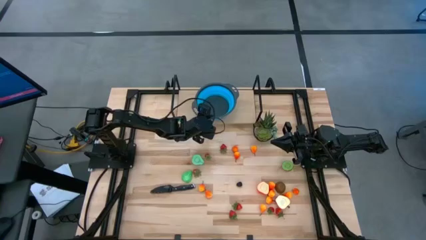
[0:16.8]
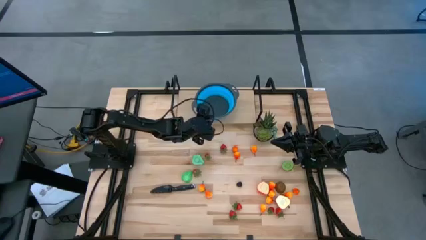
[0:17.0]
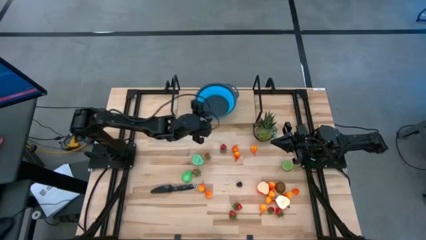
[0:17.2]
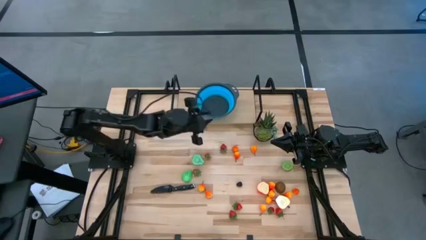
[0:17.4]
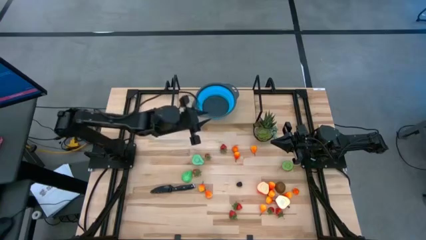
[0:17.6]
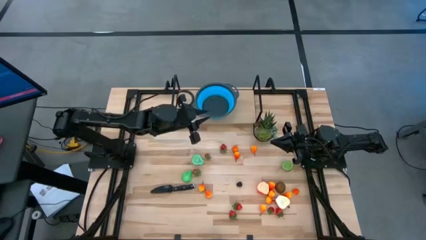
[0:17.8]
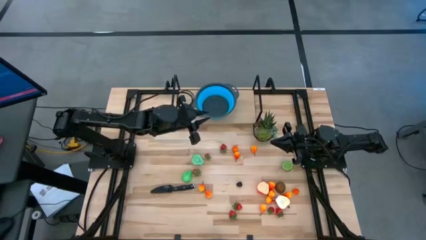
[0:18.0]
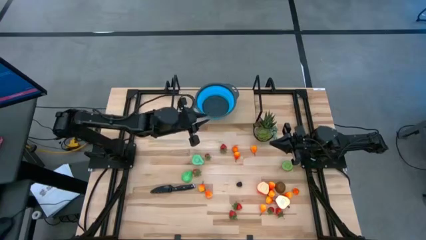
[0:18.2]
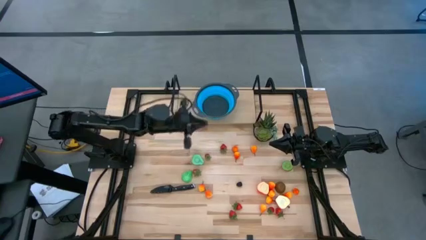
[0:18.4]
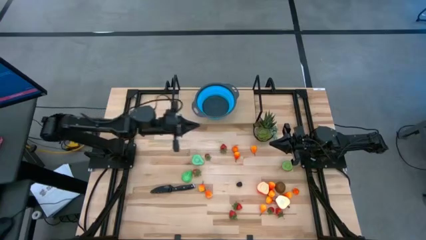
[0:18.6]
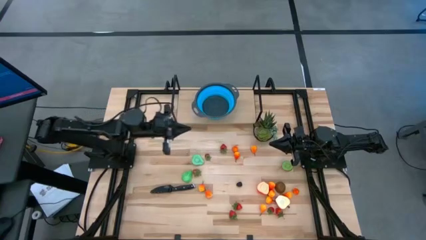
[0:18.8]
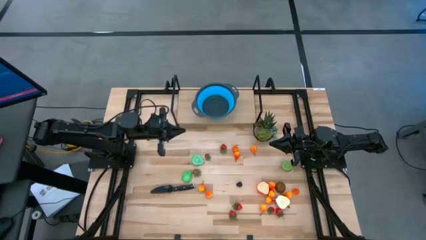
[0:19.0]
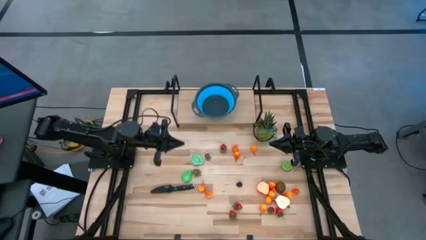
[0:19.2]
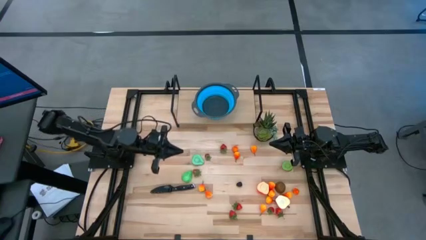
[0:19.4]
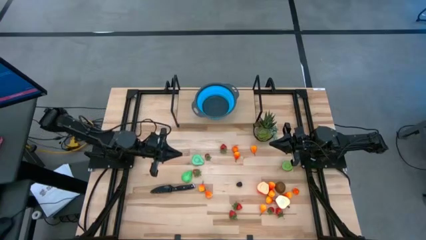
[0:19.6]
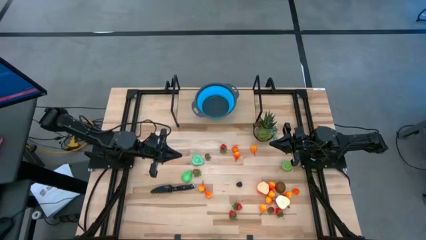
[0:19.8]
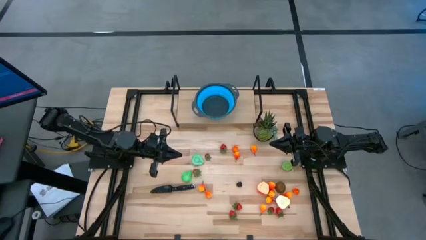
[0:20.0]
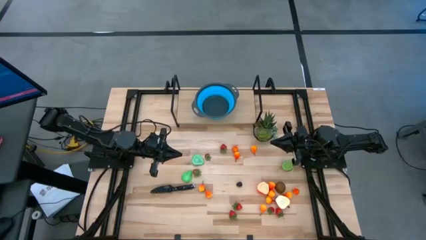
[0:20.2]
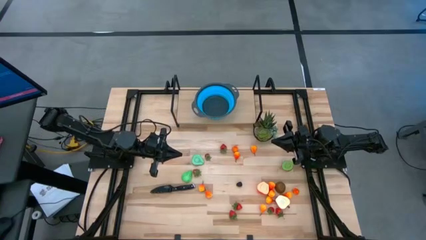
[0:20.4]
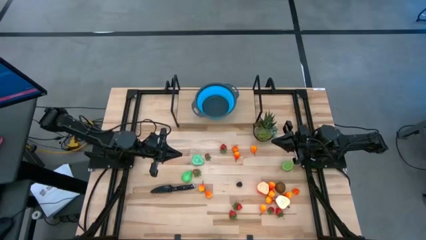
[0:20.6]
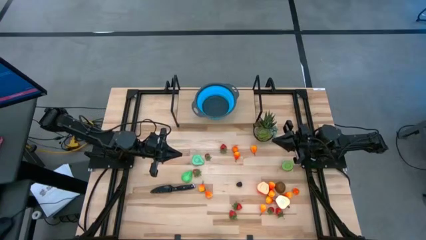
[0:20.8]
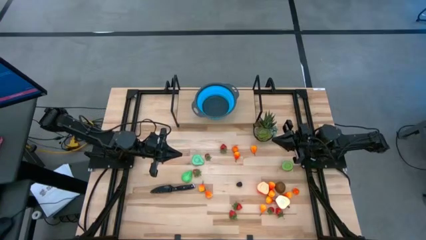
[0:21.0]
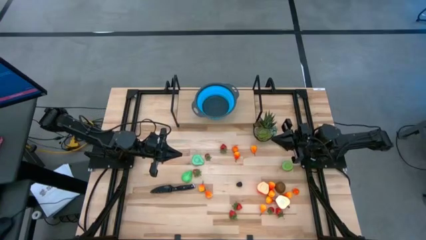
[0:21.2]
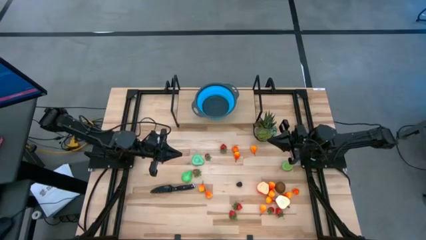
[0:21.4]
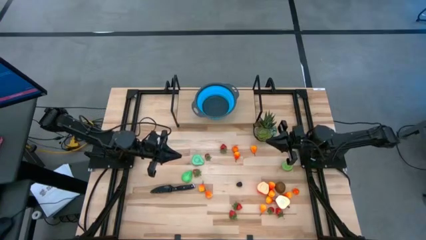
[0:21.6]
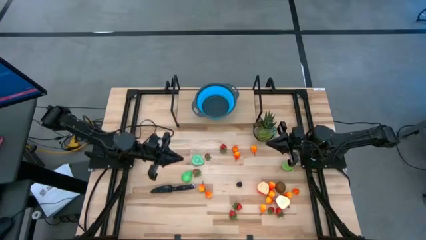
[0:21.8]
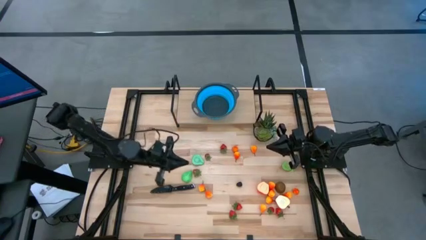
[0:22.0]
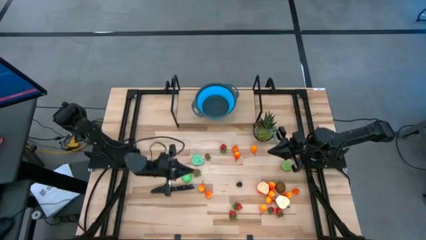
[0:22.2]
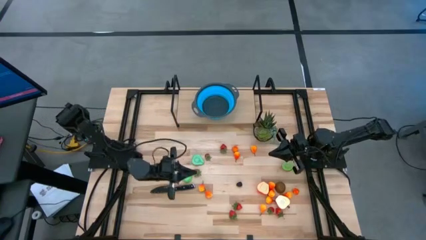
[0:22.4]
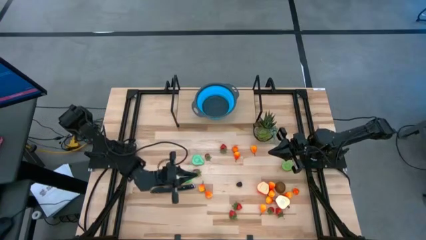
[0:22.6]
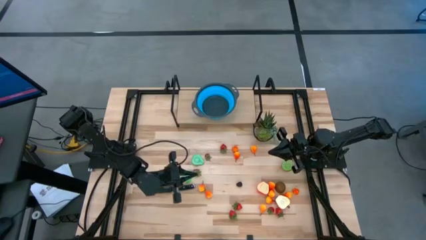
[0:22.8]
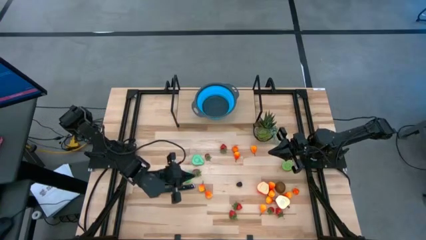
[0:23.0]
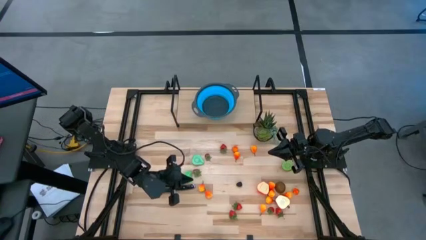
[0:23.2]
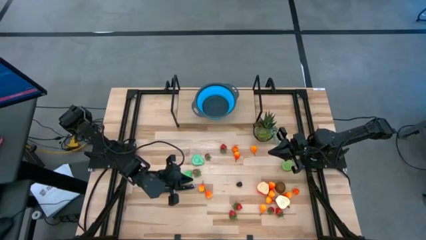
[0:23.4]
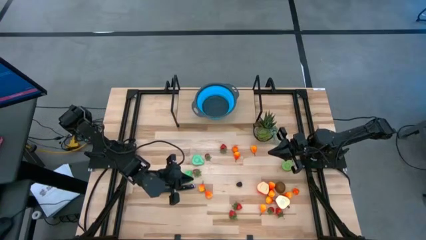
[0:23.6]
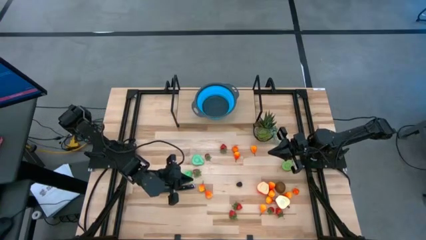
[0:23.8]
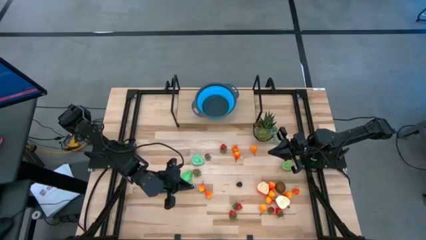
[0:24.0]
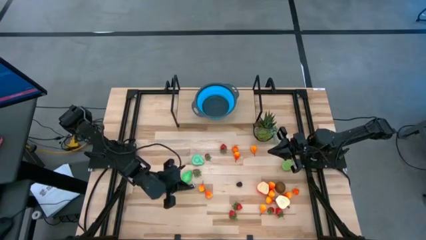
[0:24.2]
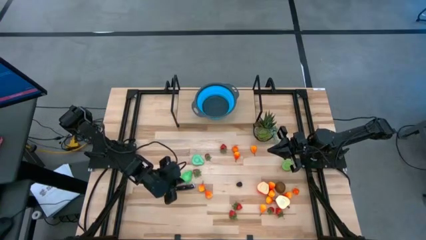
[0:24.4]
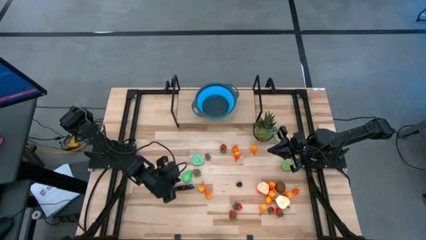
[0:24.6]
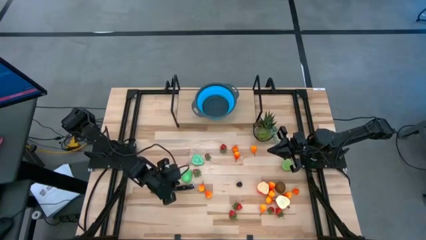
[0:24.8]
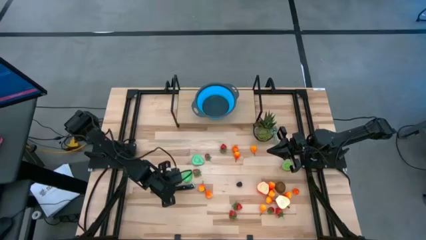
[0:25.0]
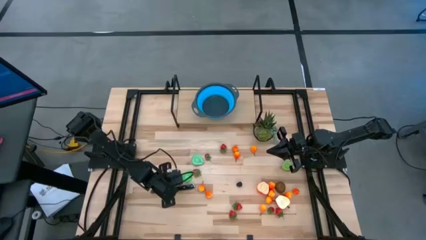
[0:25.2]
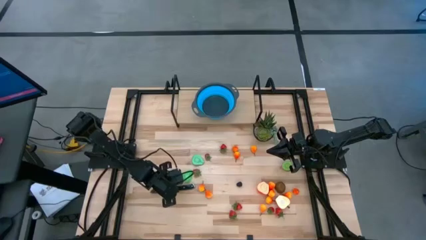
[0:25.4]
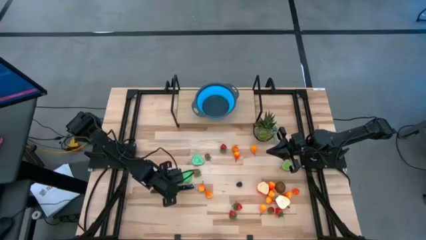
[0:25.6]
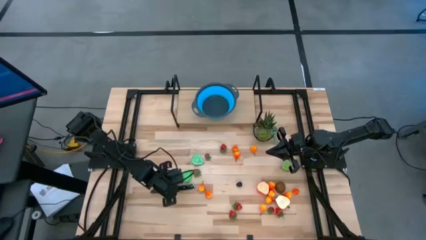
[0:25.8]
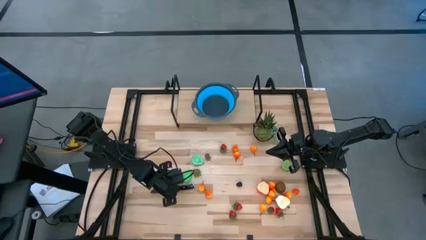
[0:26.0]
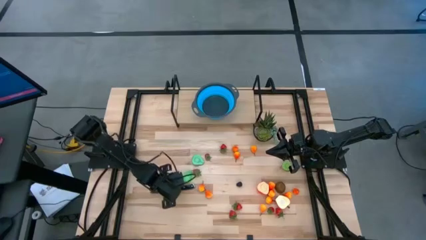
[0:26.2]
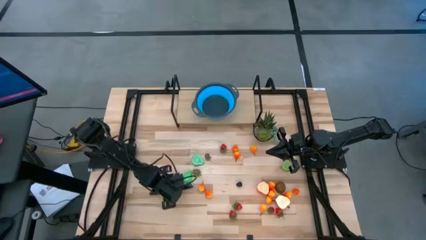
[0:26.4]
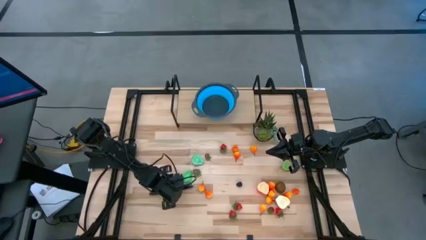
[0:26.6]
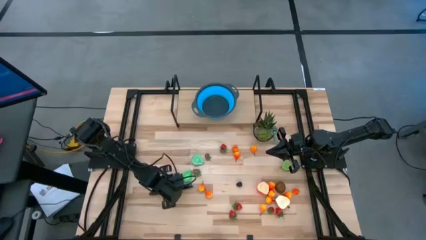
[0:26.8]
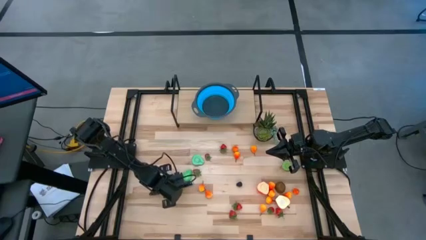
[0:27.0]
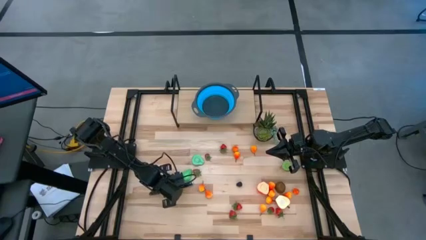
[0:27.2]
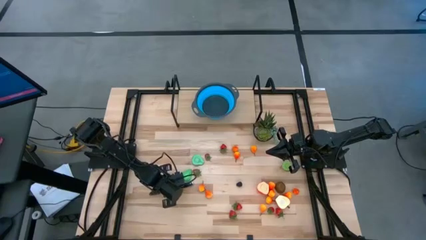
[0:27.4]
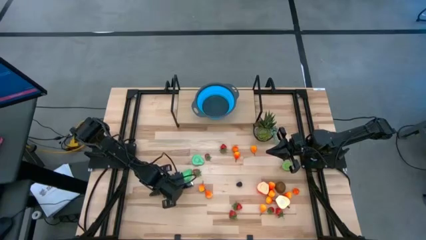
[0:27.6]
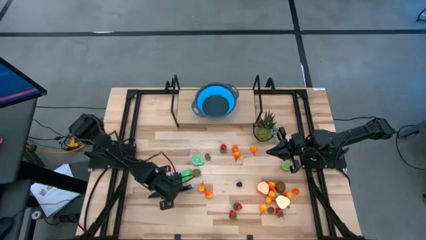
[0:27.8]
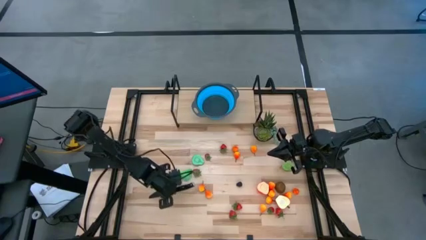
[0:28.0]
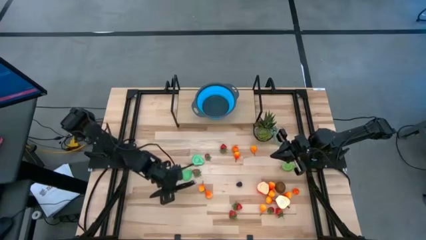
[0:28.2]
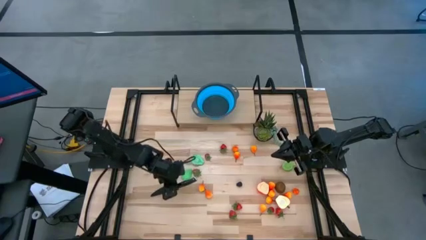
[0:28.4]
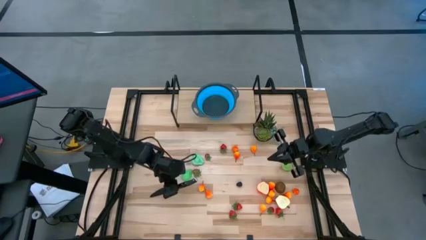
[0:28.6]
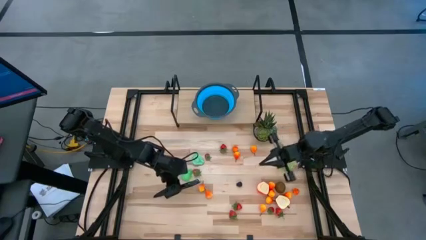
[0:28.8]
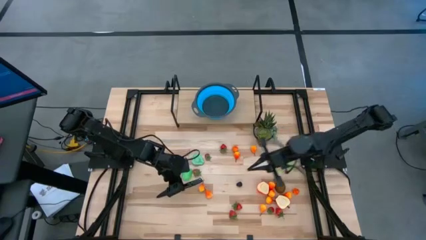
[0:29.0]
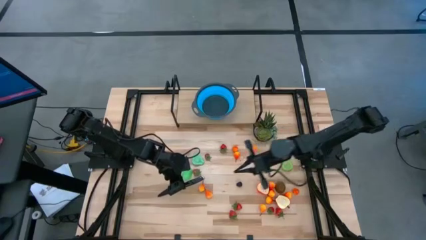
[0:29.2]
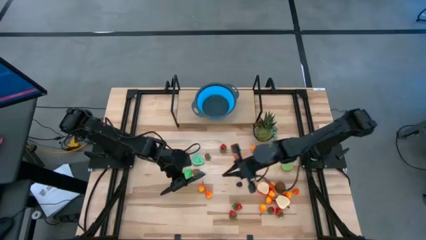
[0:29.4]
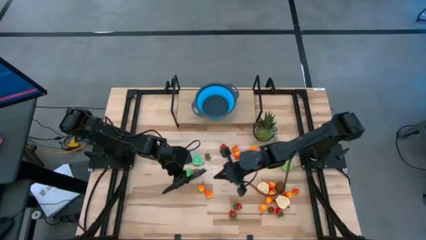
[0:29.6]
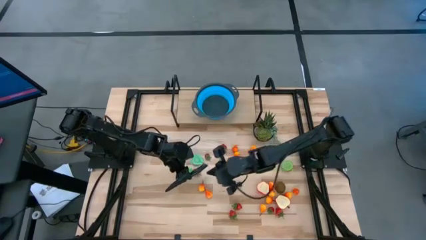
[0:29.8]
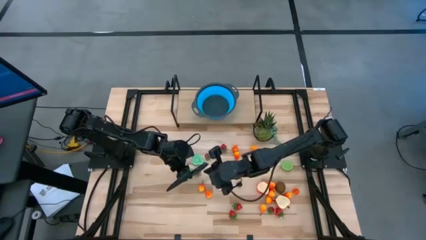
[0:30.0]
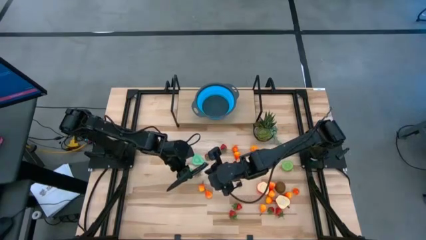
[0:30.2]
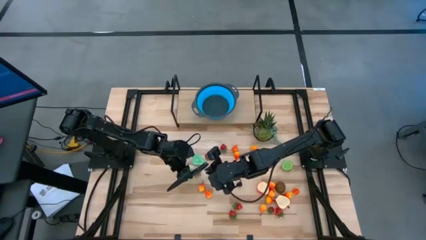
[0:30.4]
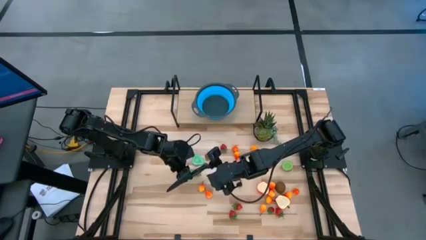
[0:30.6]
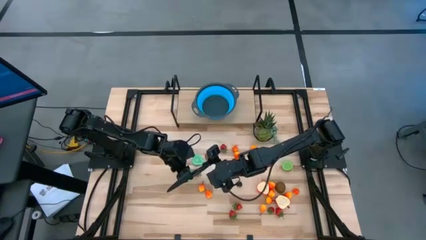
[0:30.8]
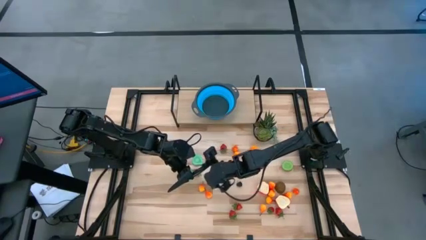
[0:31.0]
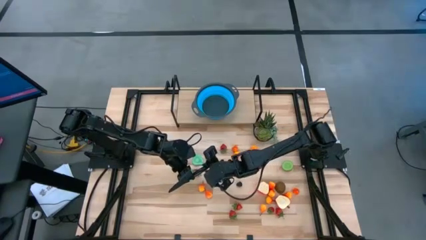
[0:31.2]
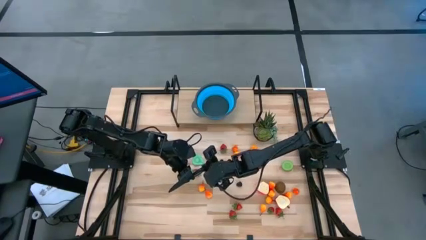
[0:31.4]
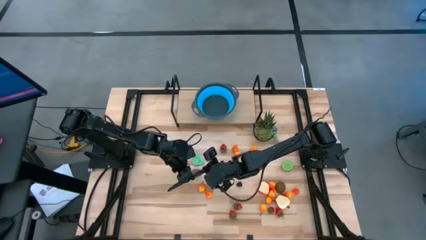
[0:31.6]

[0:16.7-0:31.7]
Task: Pick & Place Fruit
Put the knife on the shelf

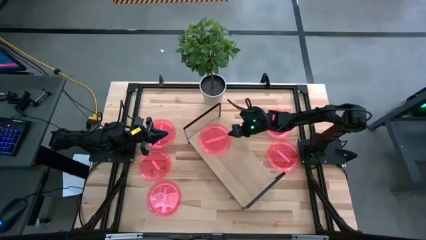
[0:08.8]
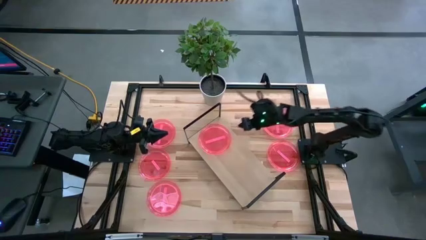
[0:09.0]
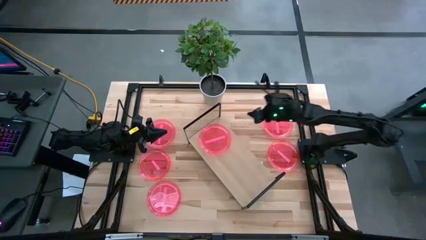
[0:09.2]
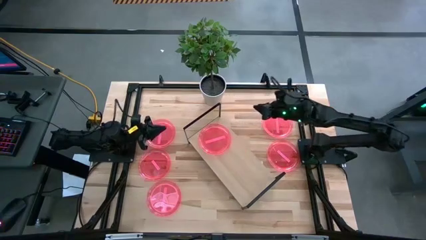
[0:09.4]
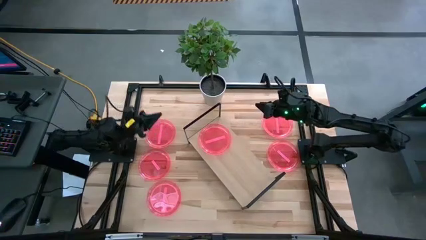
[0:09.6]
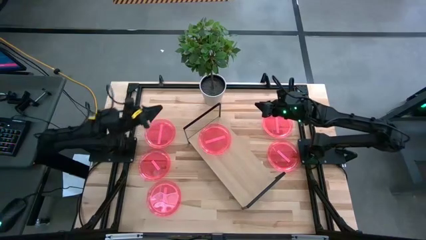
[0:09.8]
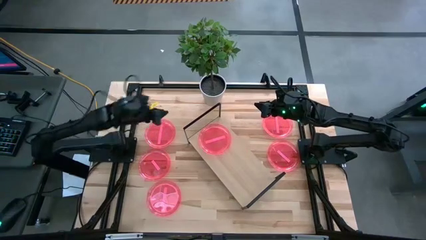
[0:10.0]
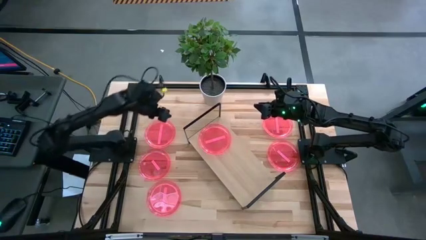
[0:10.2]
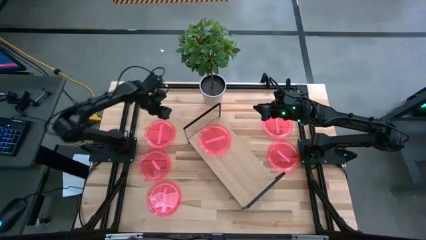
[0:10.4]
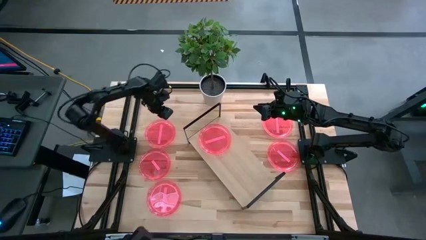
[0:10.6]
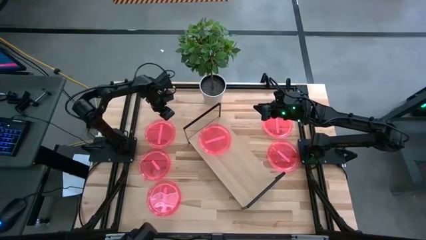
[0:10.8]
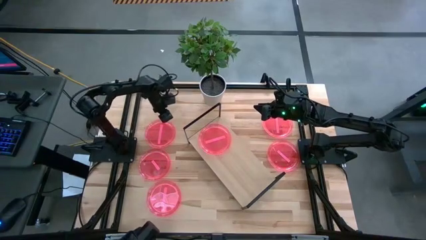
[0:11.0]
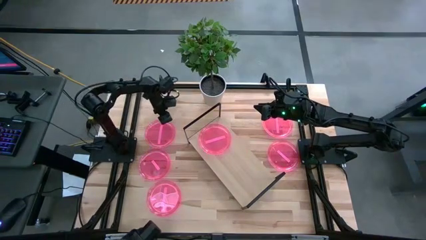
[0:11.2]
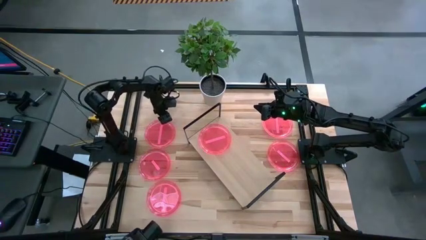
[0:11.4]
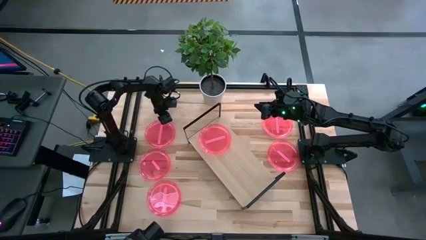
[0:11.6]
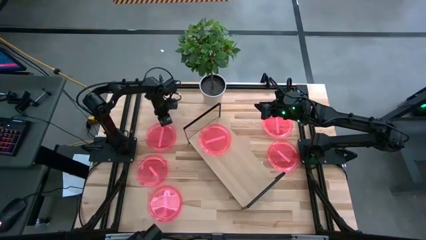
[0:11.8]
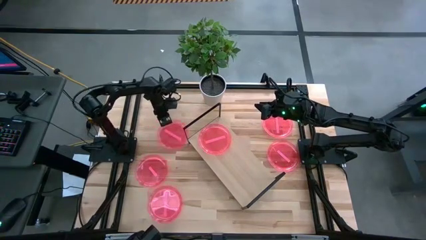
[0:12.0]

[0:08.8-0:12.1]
Task: Place and stack plates onto a shelf
Stack the pink plate on top of the other pink plate on the shelf
